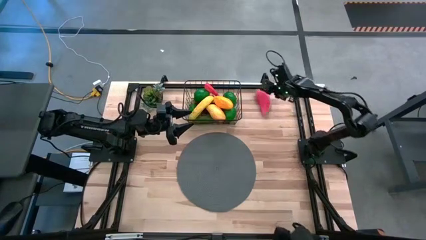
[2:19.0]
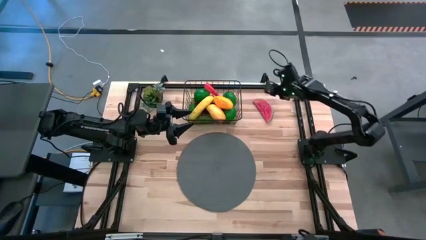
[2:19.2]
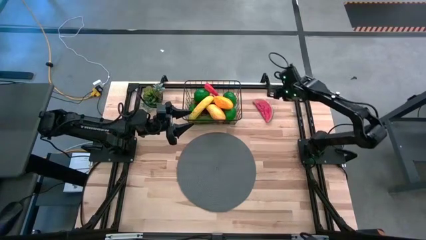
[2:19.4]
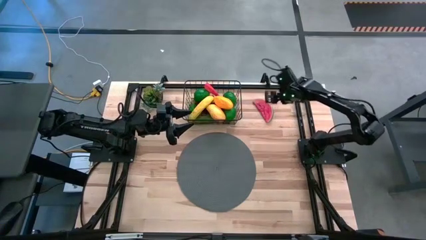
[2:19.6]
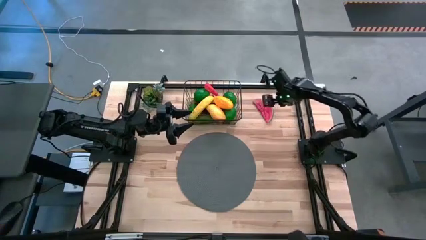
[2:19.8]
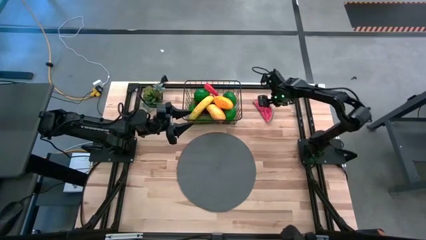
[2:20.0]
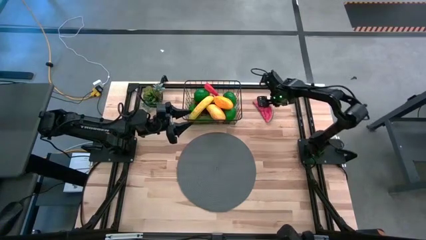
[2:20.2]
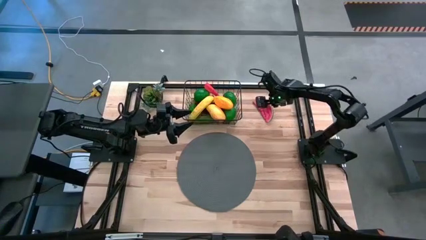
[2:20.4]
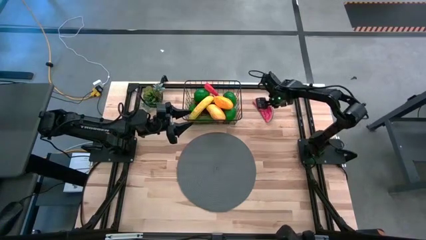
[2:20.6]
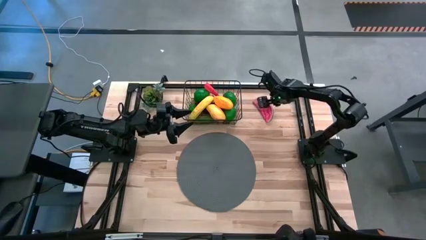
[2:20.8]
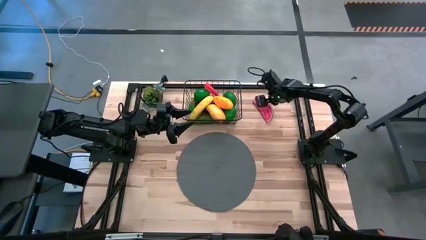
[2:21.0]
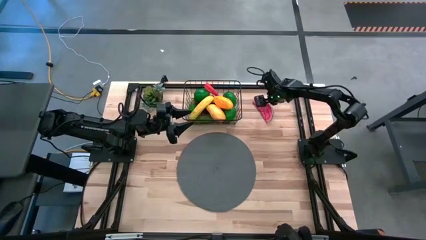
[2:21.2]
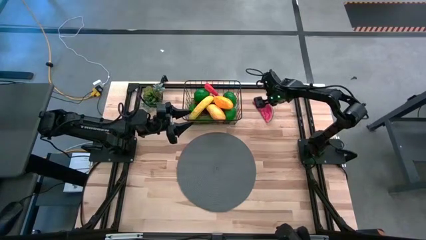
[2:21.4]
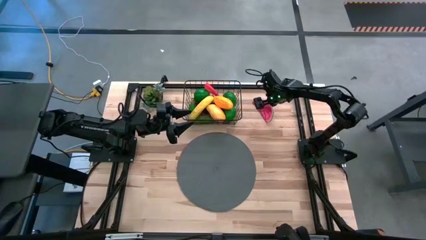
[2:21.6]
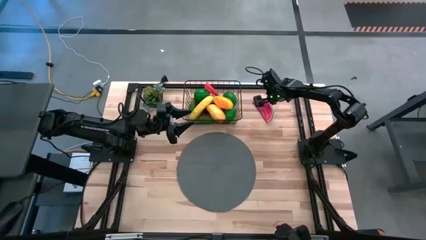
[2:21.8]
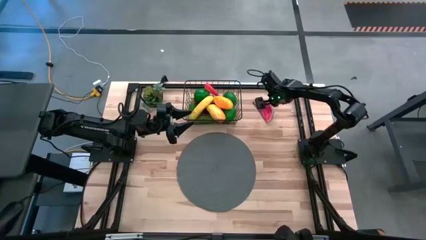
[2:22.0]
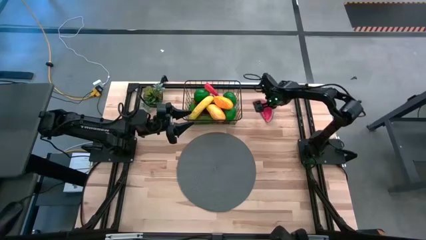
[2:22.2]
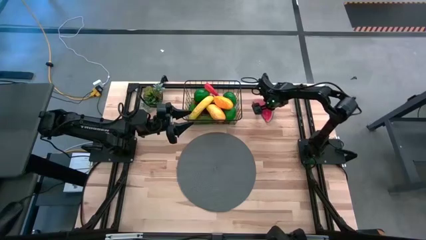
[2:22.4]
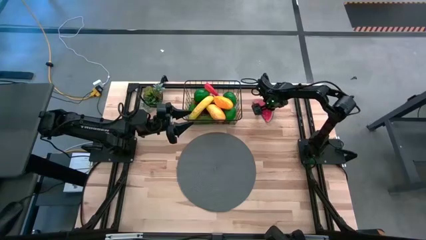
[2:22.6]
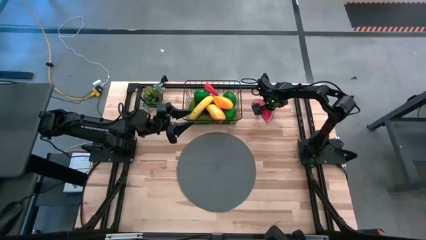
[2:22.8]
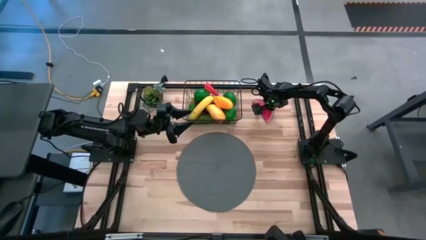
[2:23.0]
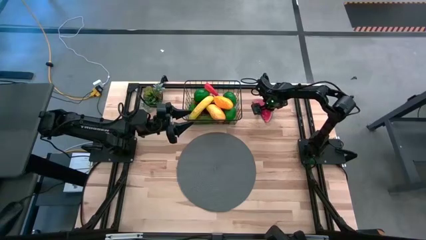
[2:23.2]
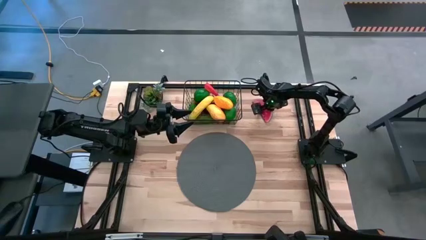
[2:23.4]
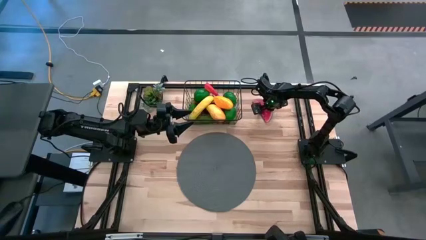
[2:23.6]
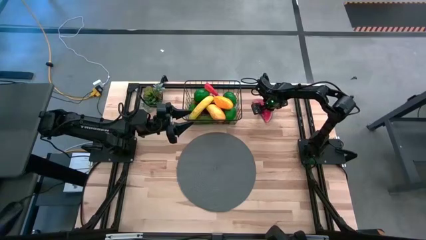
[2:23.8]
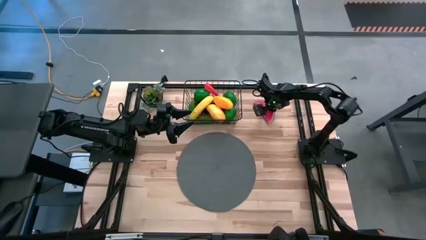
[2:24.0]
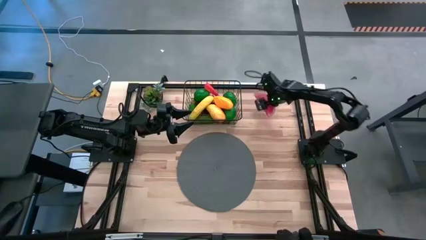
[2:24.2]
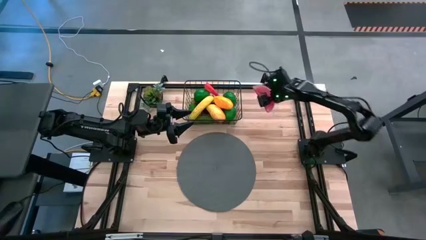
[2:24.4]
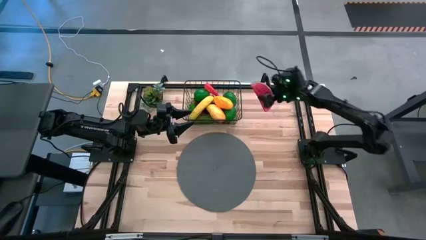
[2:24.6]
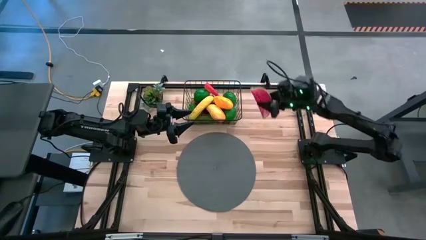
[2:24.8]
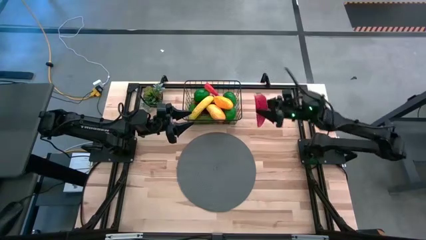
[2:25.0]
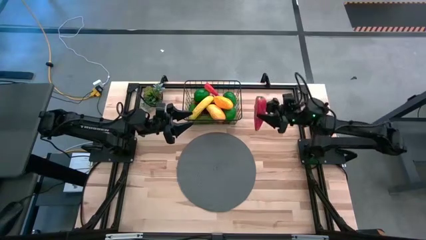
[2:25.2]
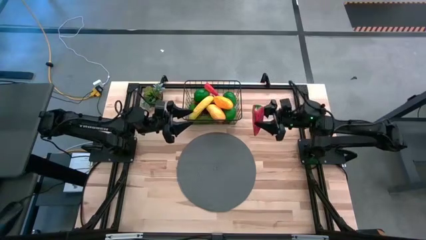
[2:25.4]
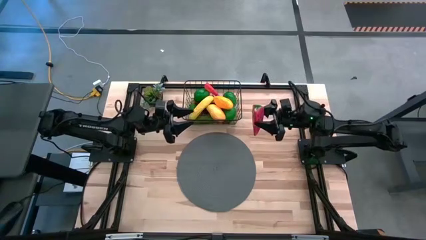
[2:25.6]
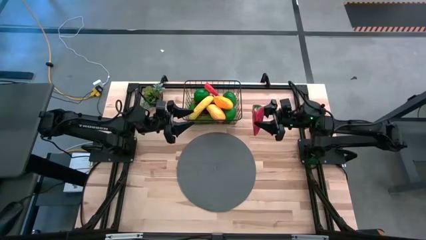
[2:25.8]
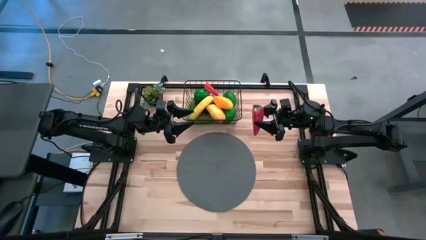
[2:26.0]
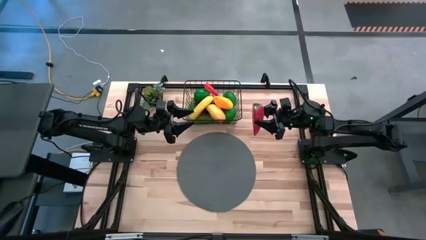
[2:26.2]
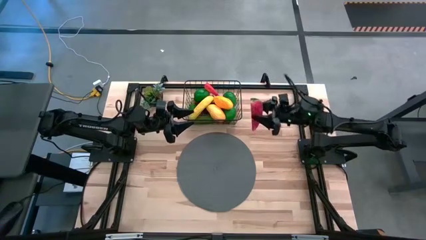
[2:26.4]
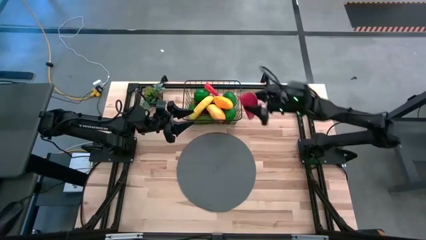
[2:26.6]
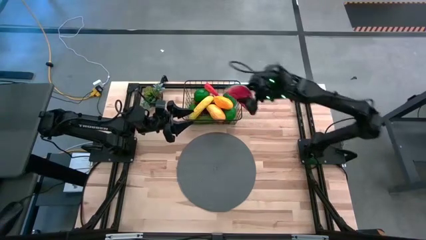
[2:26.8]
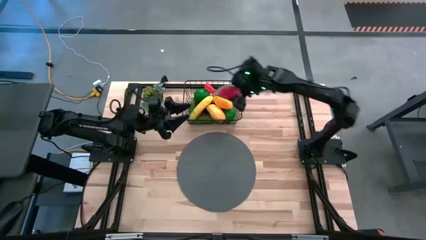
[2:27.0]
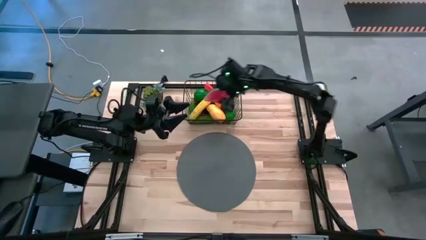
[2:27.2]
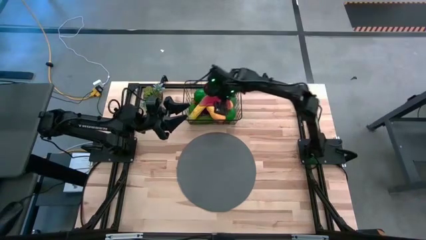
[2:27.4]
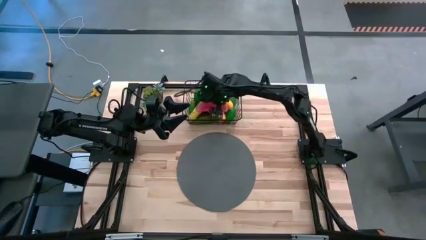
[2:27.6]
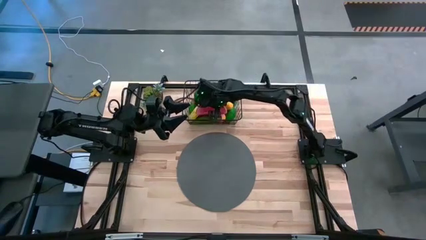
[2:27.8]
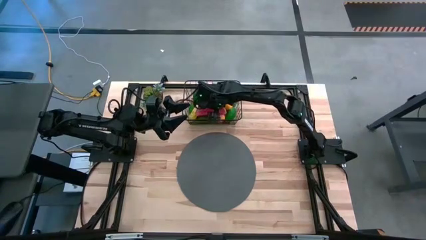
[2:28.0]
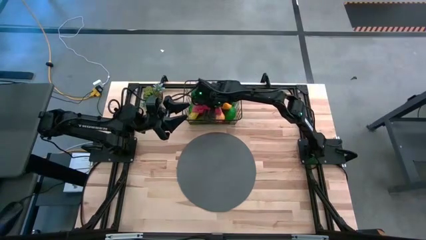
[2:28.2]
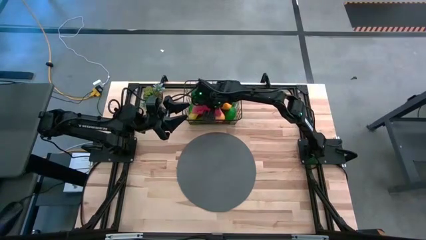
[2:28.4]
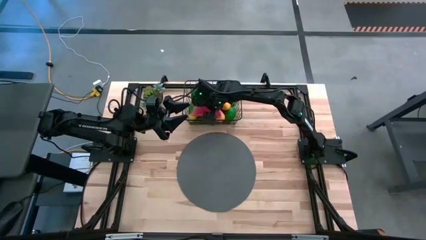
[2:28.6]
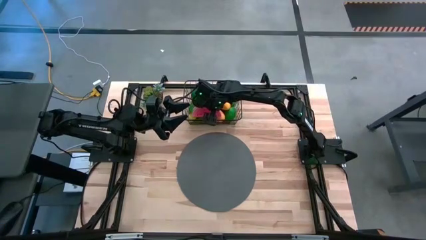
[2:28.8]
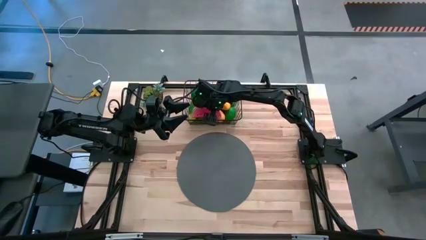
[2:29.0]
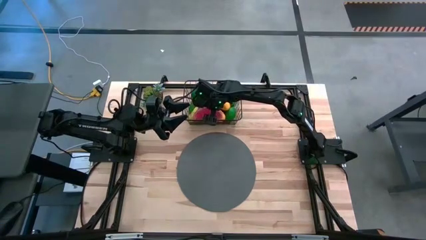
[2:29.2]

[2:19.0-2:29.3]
Task: Build produce basket
Put the green watermelon into the black wire basket

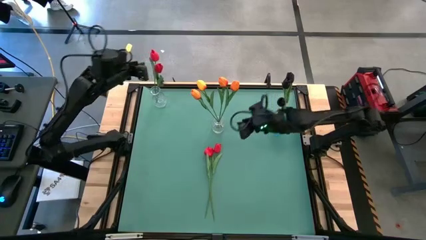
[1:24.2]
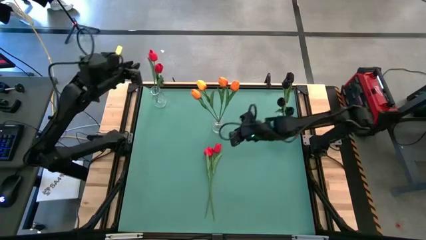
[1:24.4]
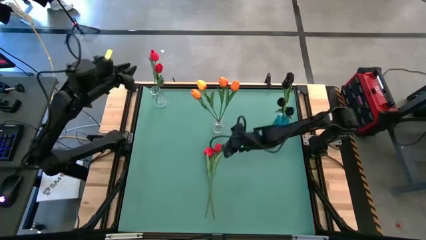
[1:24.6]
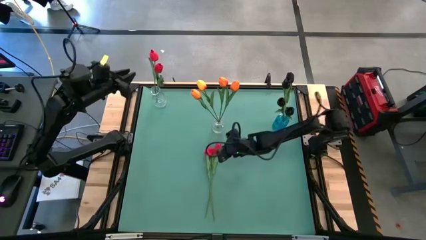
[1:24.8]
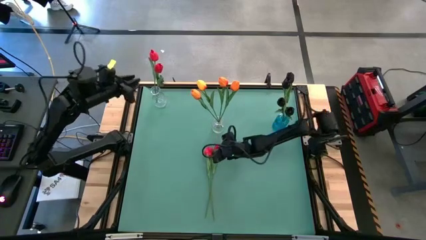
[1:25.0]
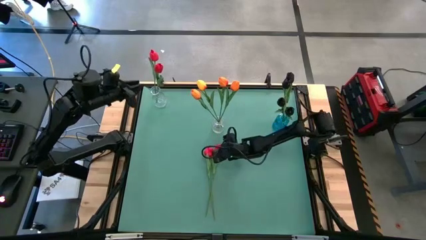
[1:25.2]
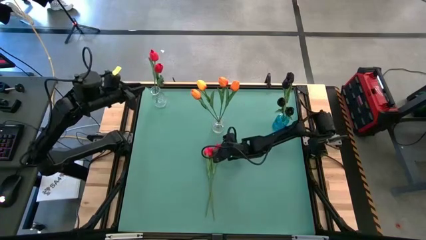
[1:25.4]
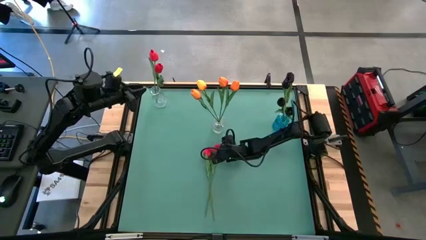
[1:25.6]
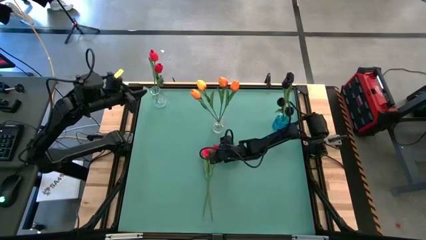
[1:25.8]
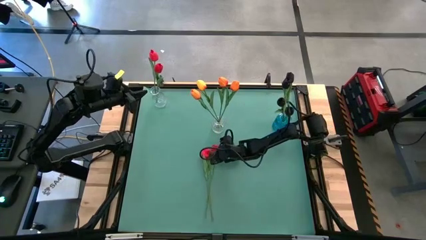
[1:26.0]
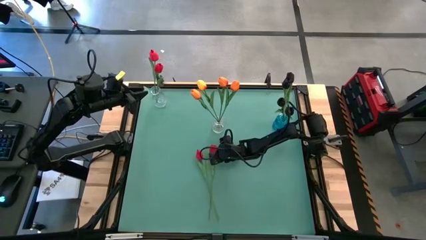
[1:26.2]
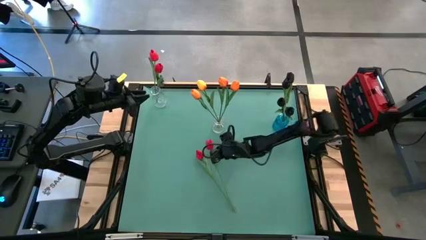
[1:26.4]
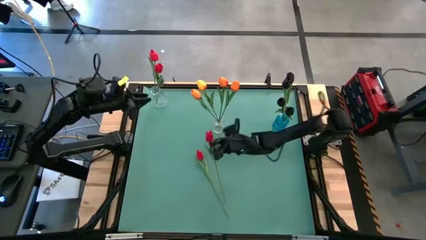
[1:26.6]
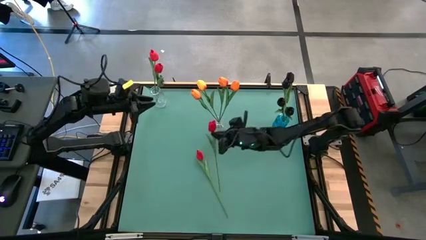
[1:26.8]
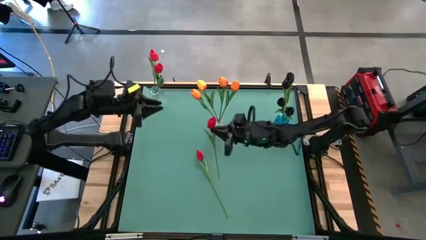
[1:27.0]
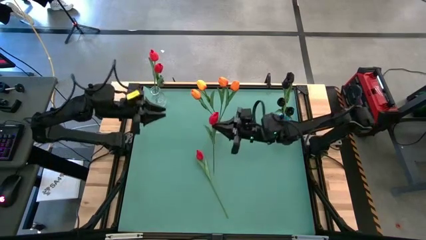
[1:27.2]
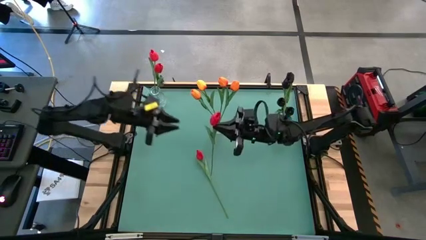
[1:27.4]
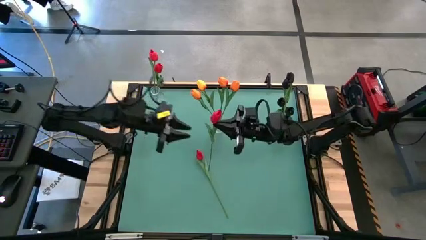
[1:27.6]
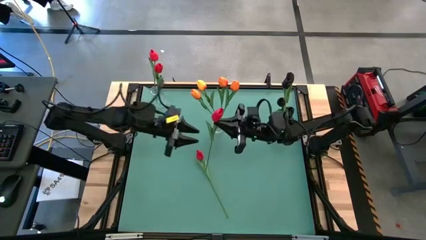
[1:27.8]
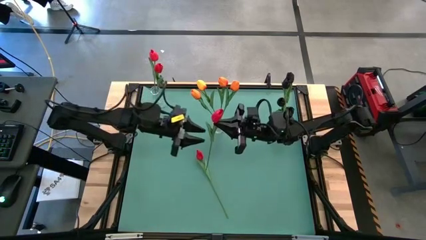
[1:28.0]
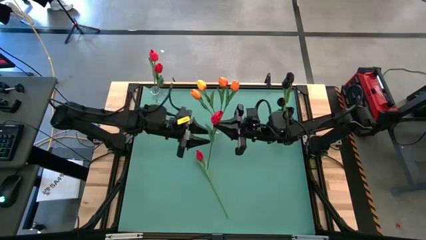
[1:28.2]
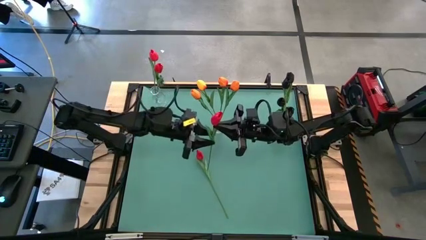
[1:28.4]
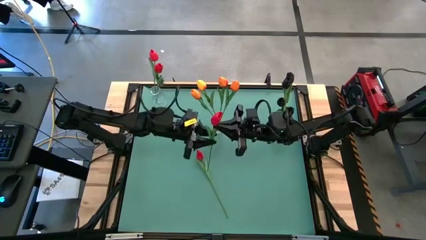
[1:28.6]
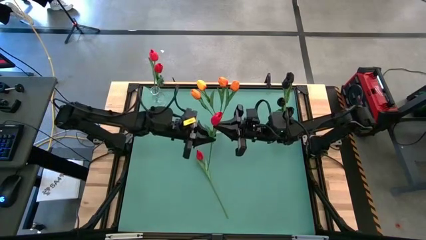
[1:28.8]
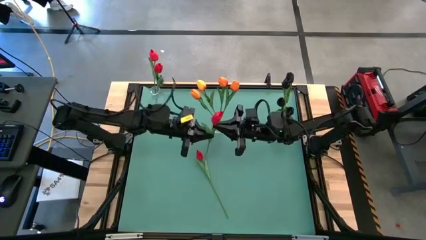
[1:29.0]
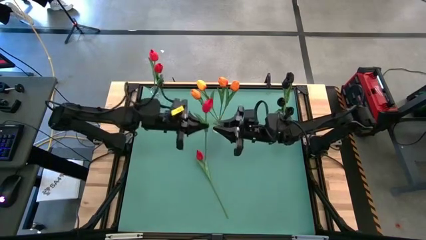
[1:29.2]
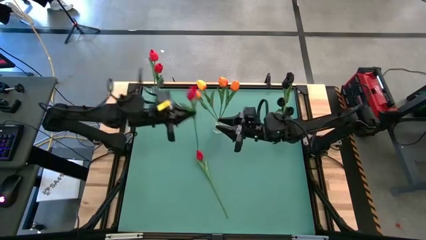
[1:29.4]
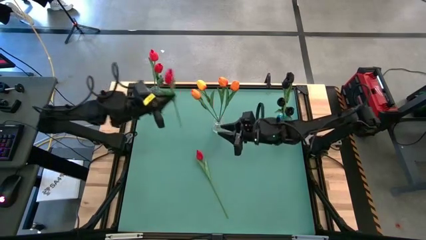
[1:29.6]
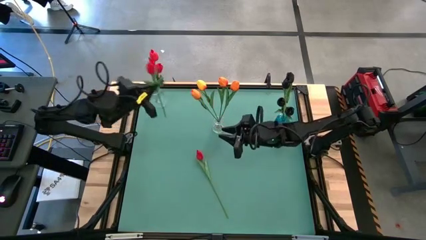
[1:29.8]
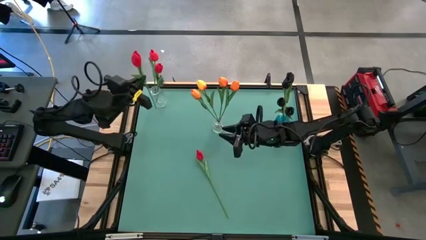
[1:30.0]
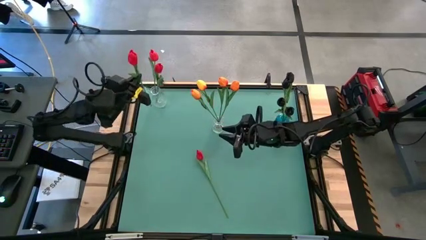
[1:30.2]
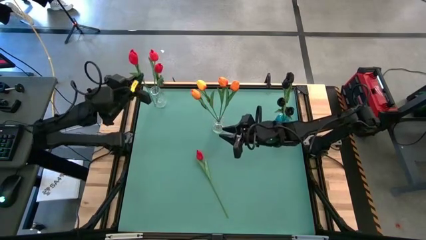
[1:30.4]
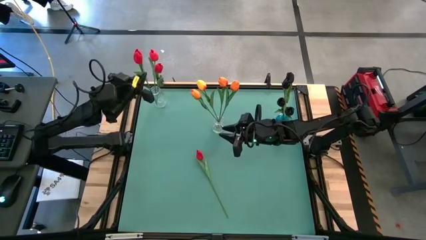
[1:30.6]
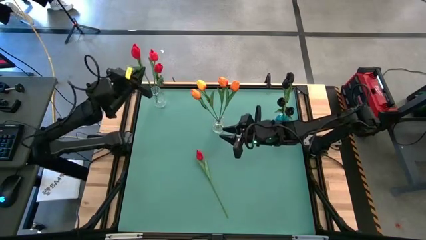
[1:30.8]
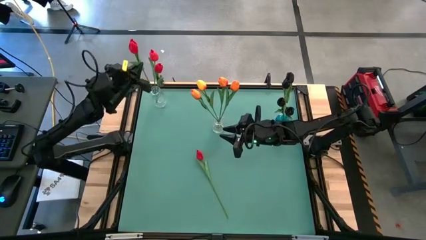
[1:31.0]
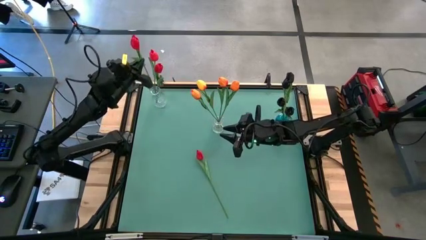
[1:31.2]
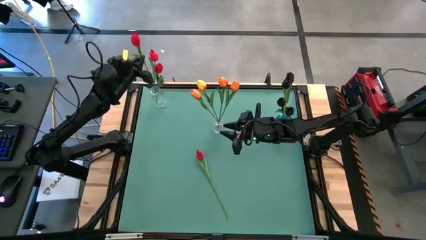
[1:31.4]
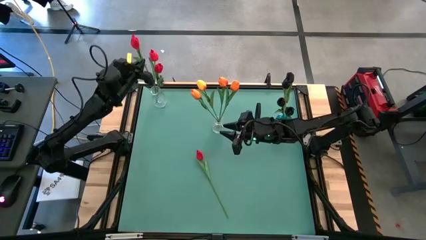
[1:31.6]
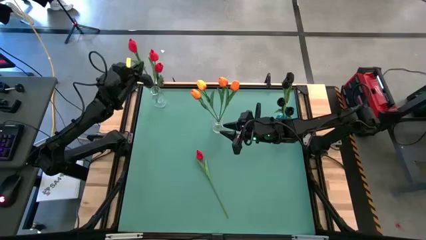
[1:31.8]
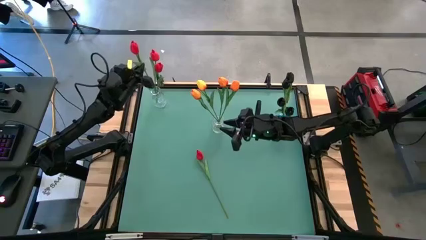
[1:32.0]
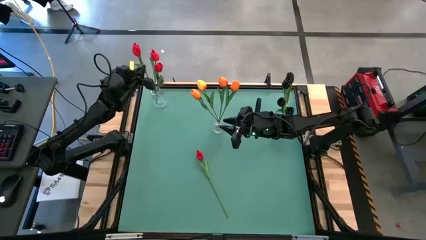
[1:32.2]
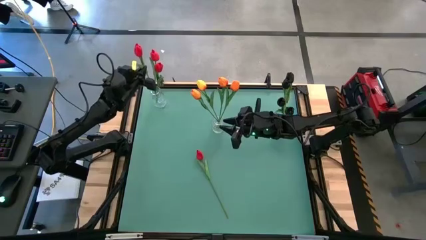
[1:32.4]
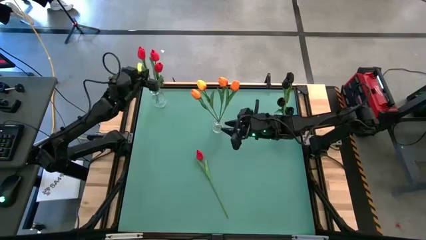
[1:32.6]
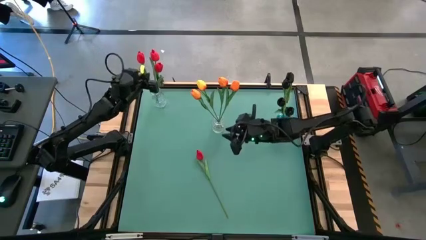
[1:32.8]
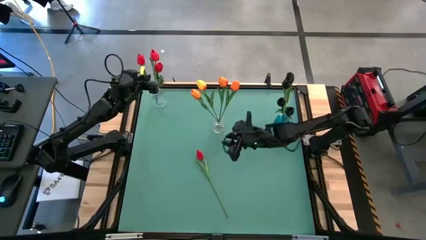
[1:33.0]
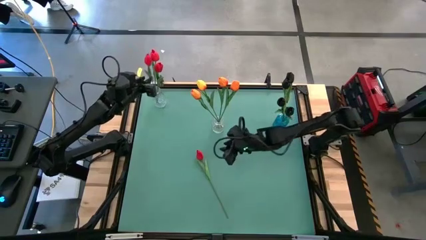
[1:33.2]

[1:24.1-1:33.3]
Task: Sort flowers into vase by color
Put the pink tulip into the top left transparent vase
